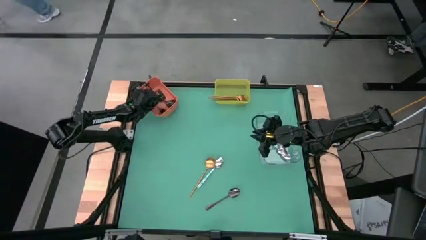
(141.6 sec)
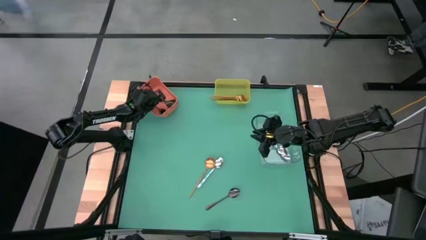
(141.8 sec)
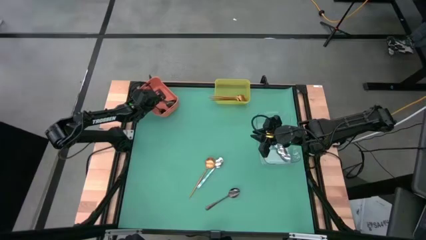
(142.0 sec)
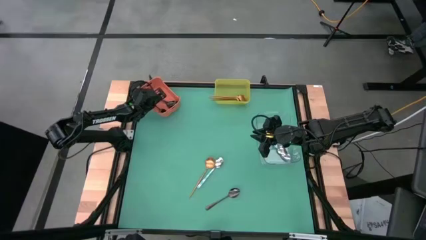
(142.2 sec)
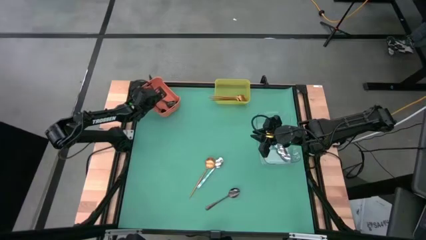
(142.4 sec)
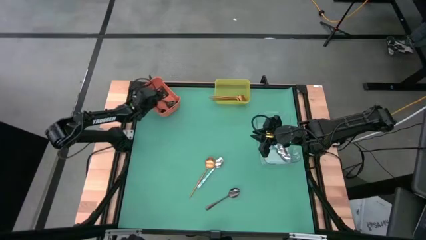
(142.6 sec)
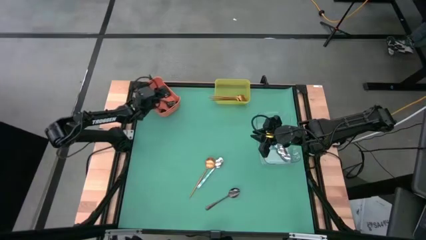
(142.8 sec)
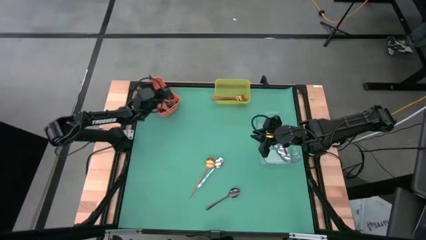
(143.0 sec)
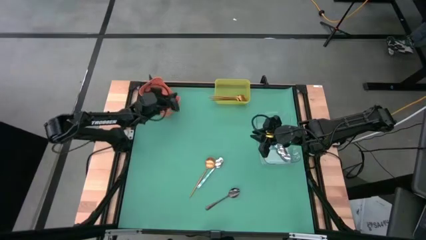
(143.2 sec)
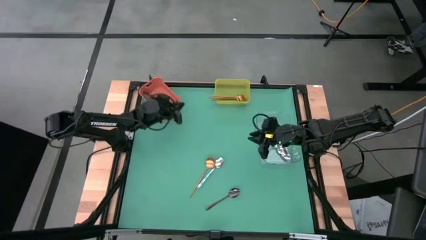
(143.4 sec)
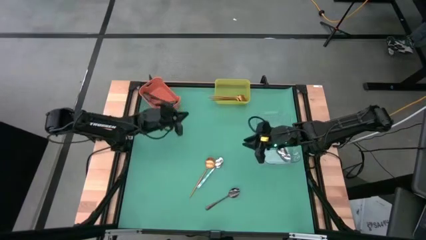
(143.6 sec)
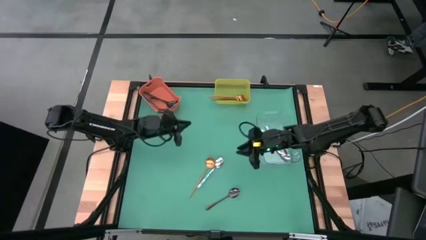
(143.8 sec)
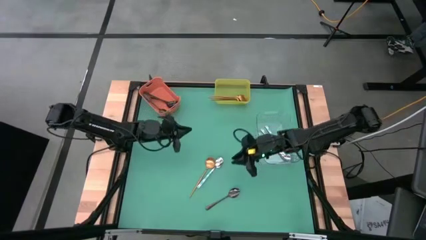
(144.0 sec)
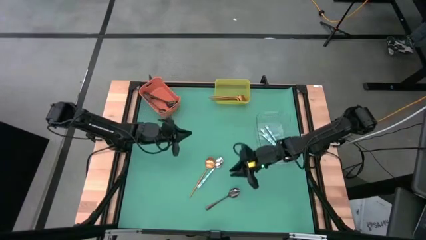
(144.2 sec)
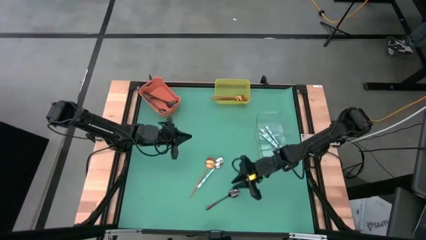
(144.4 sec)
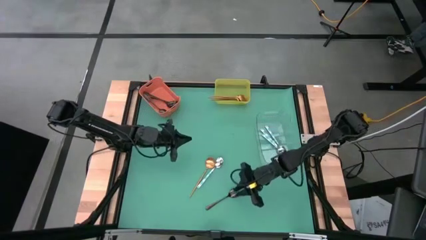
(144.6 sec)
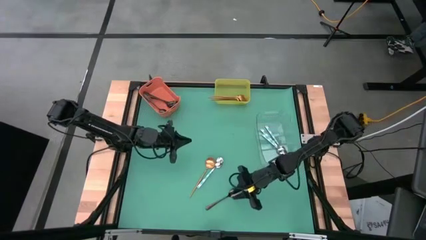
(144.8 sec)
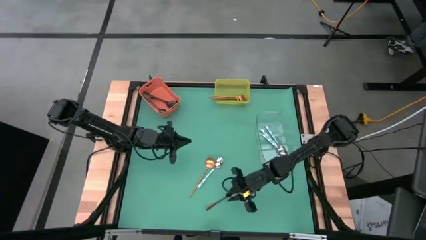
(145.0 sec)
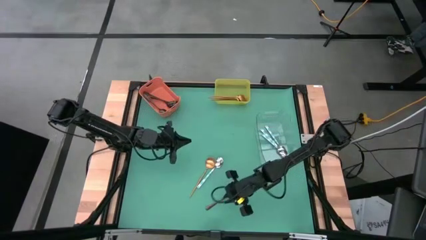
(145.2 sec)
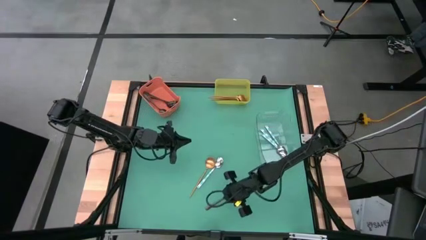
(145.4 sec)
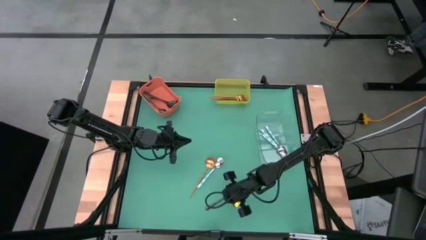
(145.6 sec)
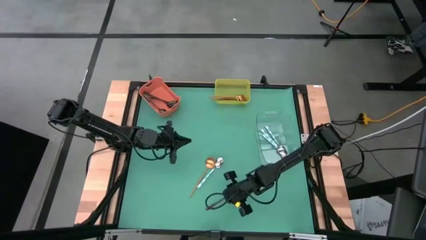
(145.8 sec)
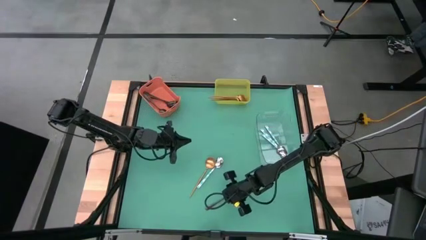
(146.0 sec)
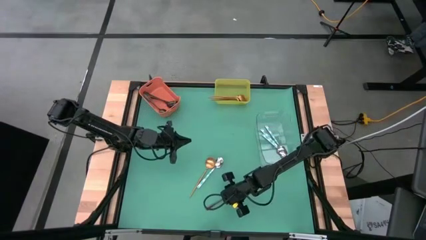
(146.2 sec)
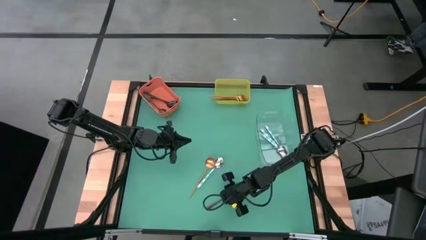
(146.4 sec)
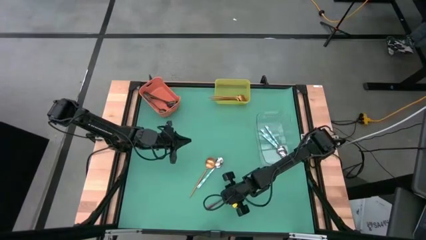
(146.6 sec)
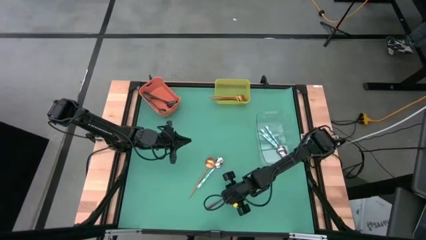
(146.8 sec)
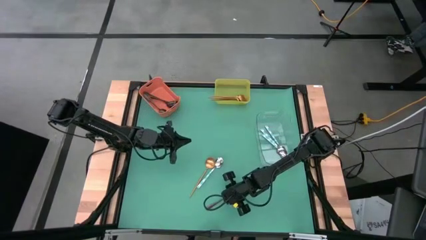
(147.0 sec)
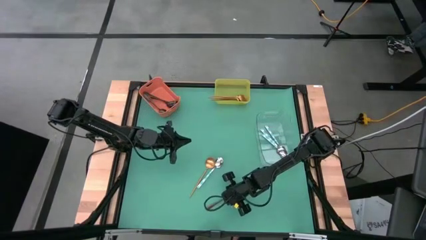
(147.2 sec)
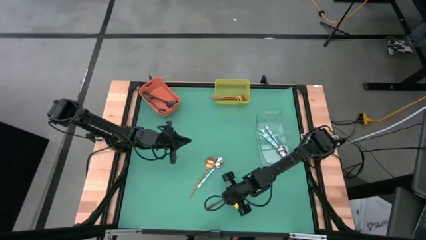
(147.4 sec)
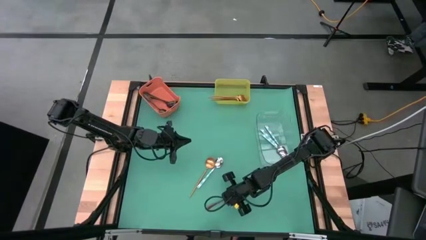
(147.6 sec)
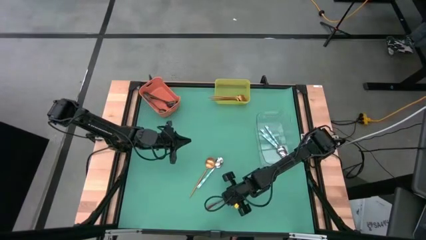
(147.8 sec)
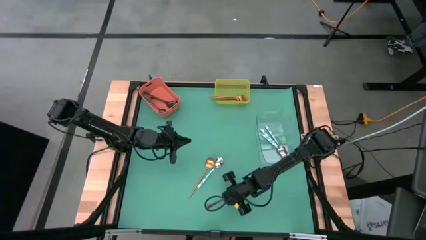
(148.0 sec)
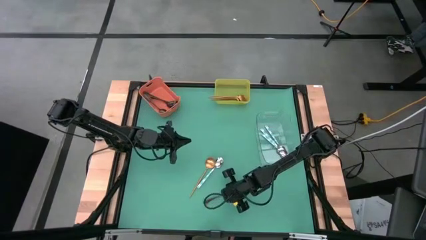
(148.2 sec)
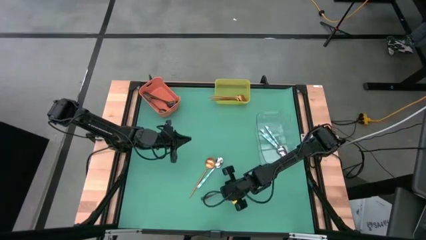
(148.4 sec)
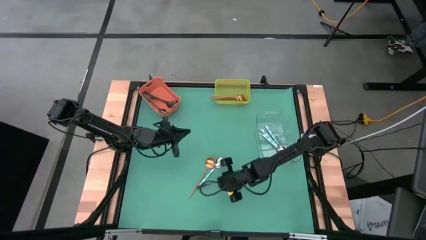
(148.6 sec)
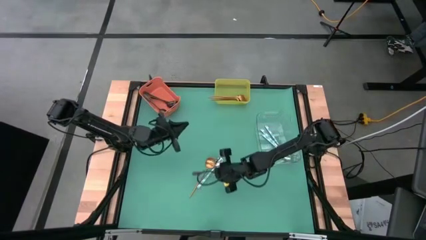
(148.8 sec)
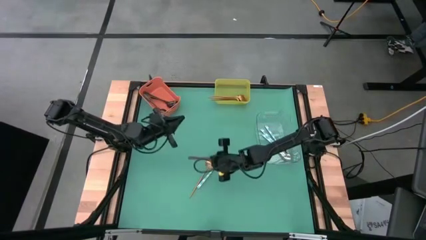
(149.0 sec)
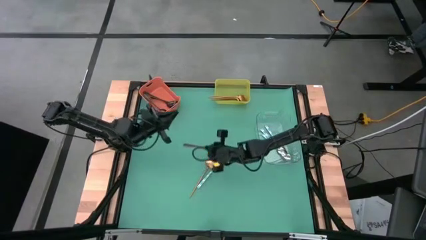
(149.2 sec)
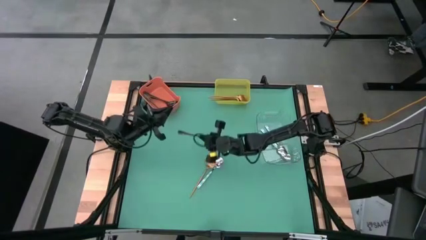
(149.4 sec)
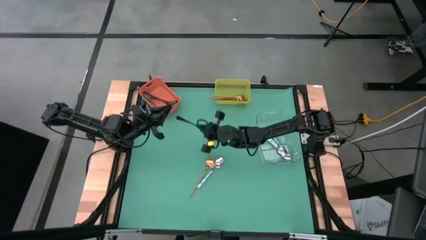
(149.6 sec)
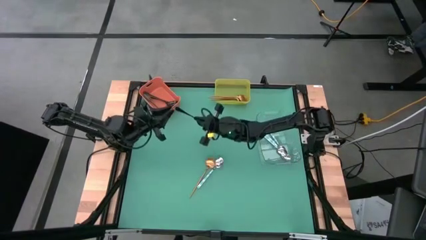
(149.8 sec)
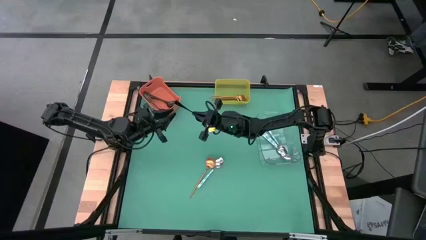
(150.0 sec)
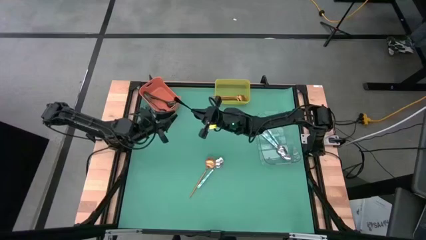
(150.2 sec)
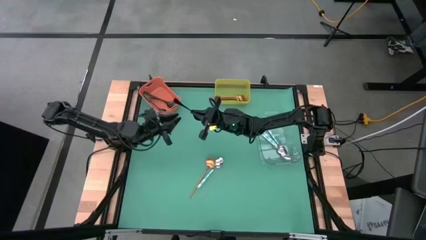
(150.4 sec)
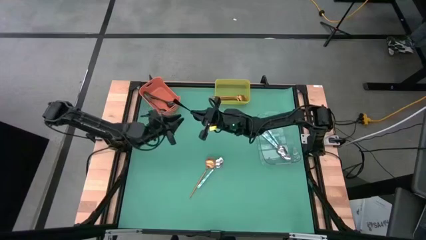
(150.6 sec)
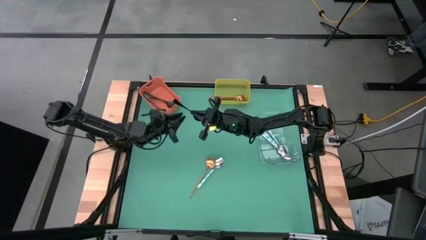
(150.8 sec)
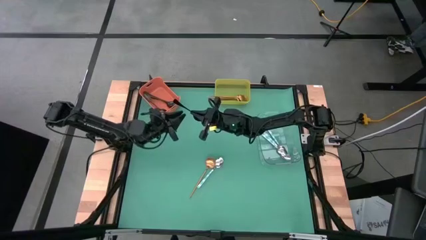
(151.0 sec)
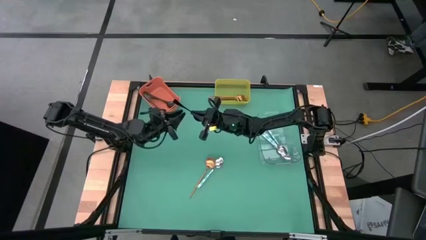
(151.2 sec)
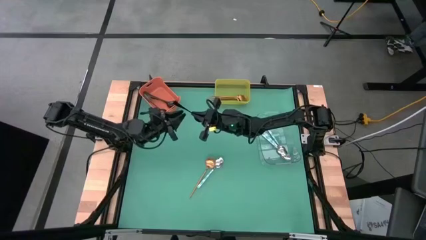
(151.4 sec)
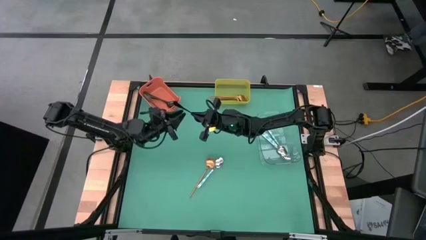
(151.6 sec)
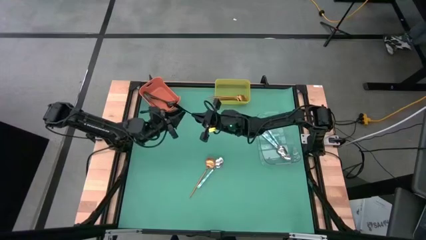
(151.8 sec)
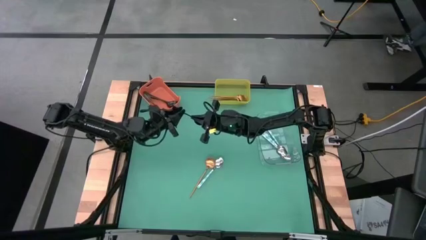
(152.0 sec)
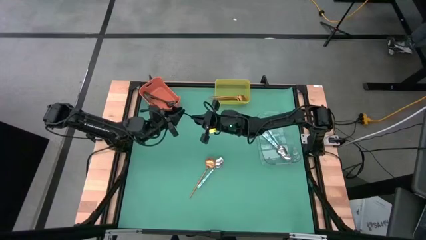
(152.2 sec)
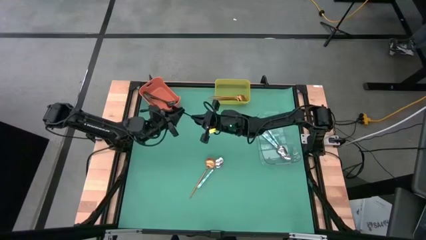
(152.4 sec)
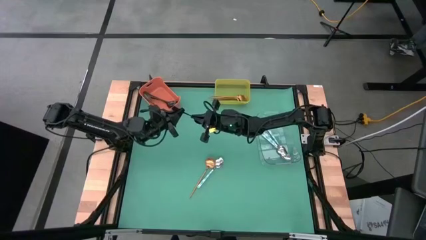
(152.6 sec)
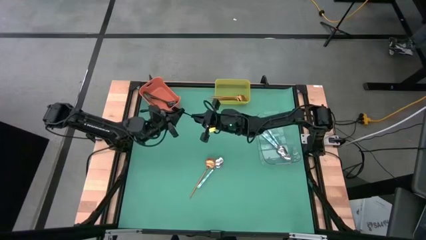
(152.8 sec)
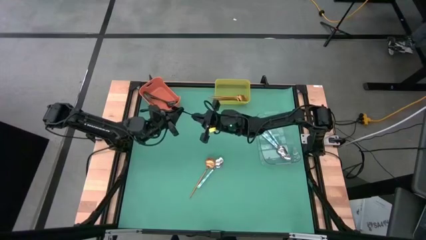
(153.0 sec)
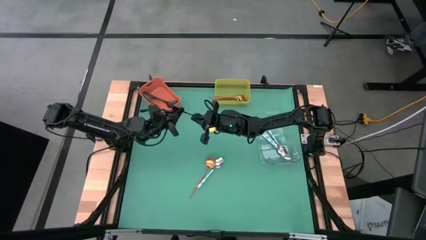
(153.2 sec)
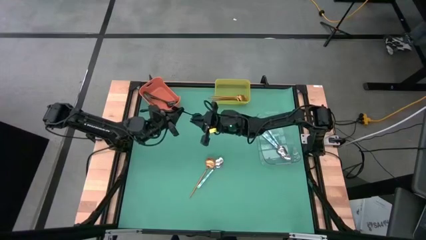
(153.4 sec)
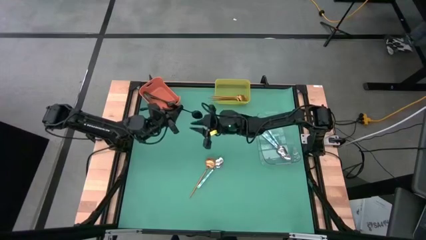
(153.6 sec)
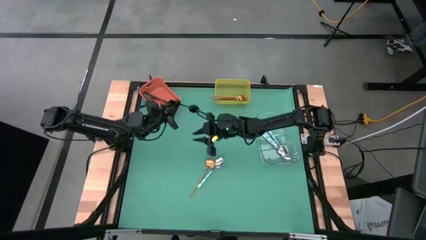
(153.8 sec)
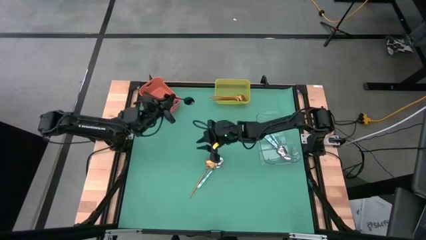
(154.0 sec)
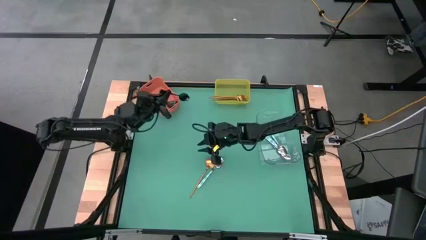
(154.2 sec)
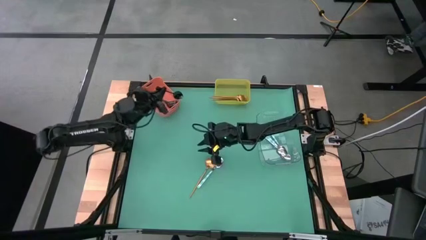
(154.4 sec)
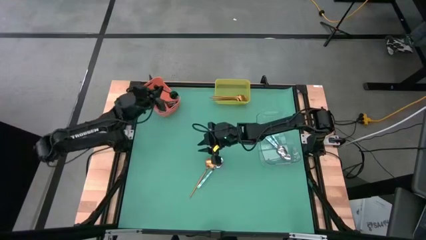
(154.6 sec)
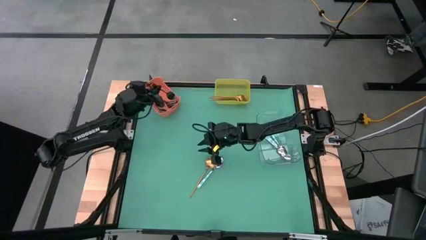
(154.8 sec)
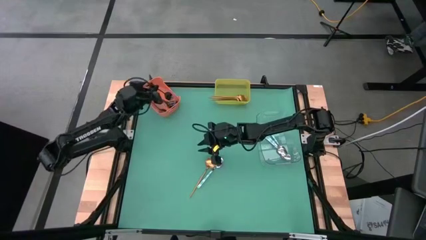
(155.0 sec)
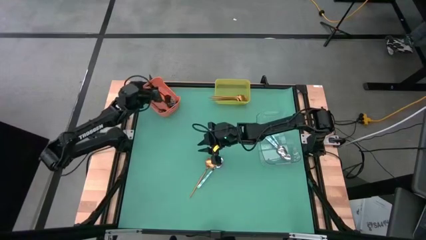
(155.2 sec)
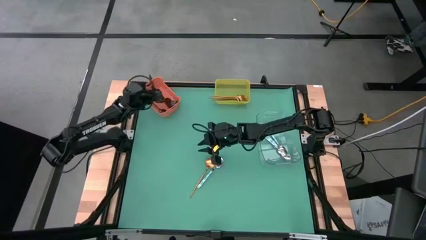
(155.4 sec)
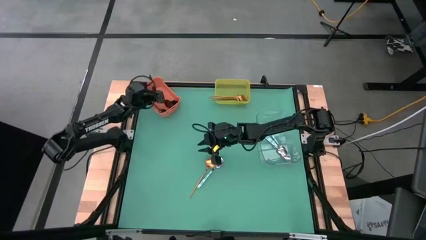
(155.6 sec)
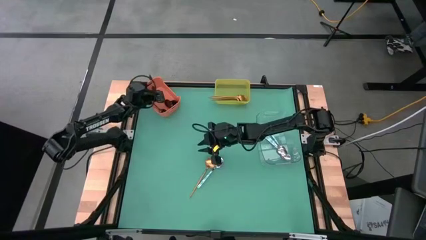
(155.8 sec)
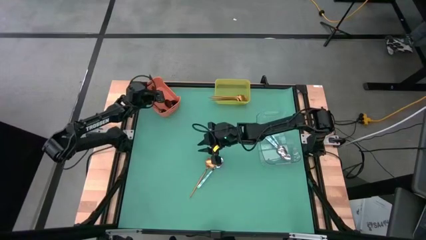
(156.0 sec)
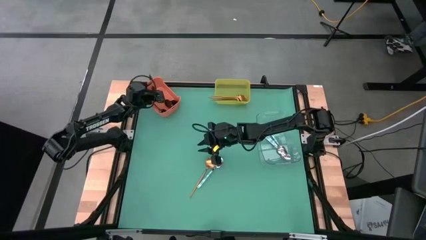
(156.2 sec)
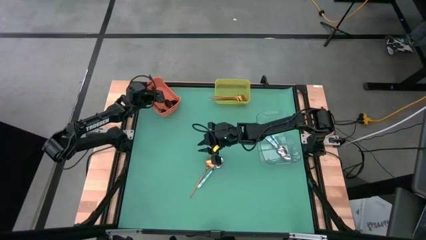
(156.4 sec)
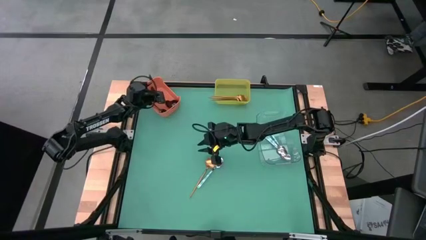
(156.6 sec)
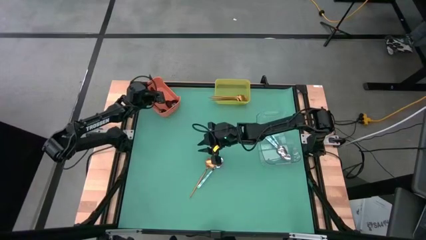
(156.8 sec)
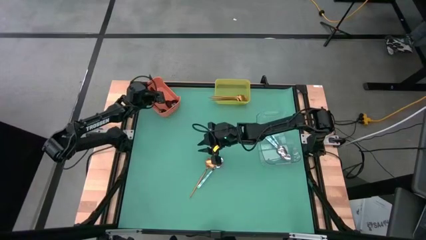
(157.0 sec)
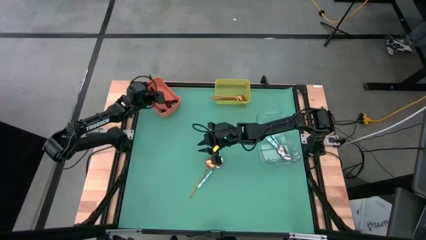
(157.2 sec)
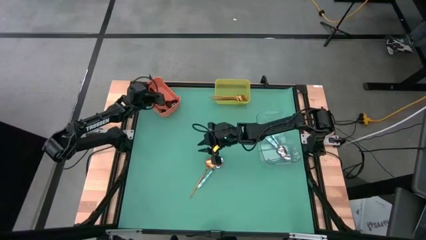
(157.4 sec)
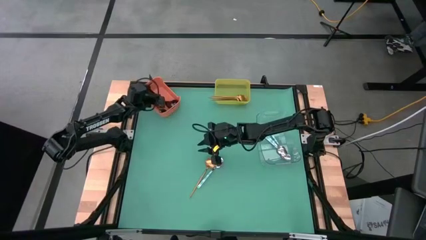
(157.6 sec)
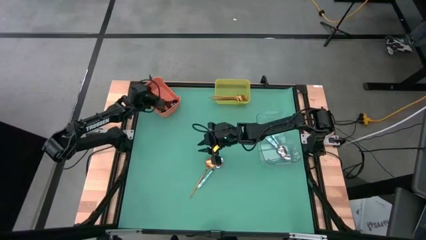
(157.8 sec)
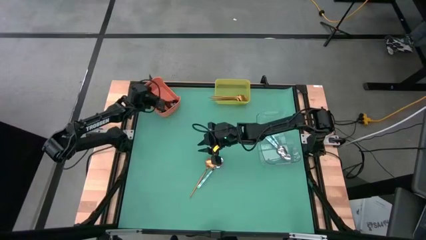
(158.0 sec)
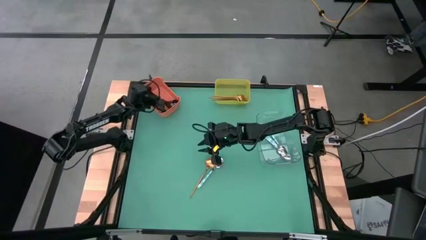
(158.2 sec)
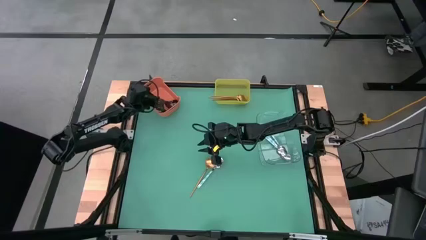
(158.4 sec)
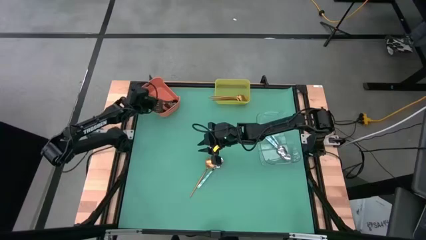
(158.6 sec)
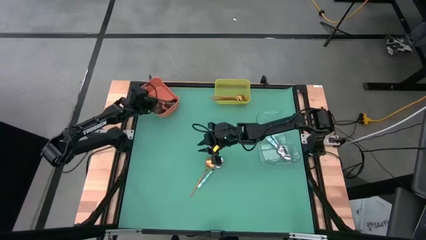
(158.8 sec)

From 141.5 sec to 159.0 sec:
Task: Sort silverware by color (type)
Put the black spoon into the orange bin
